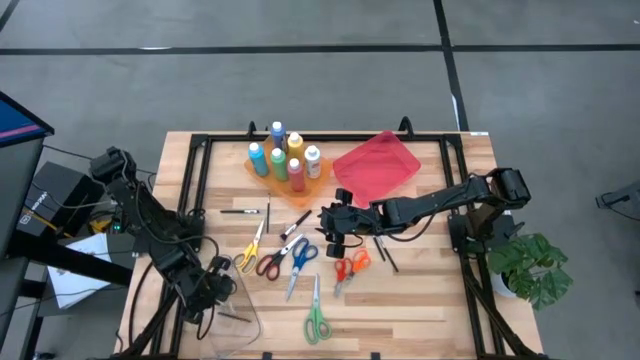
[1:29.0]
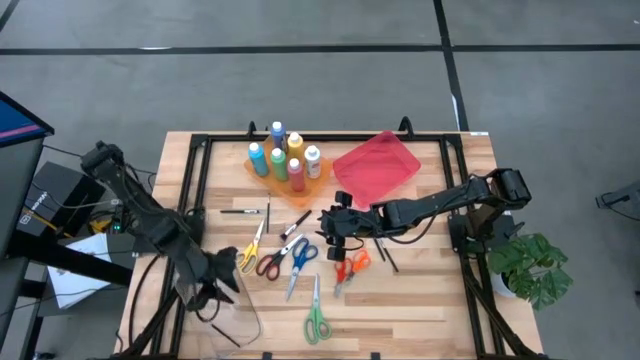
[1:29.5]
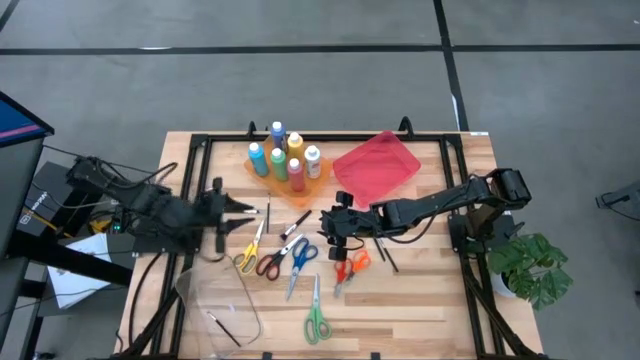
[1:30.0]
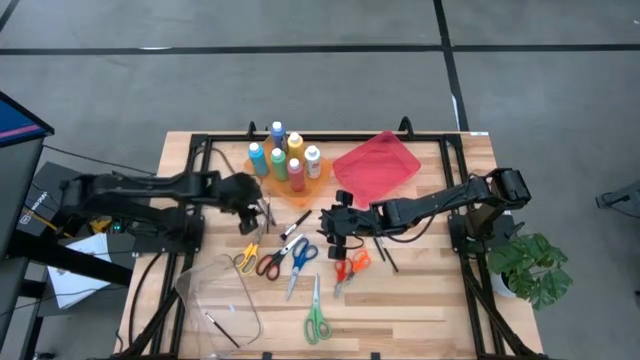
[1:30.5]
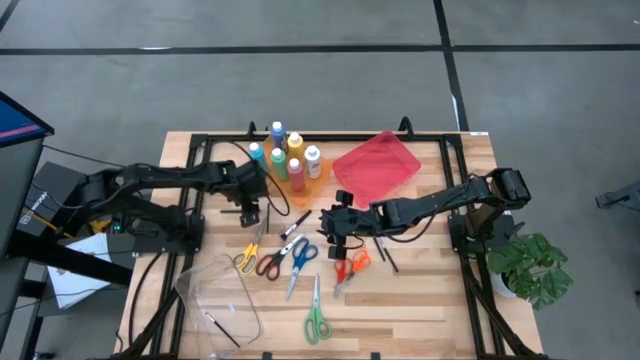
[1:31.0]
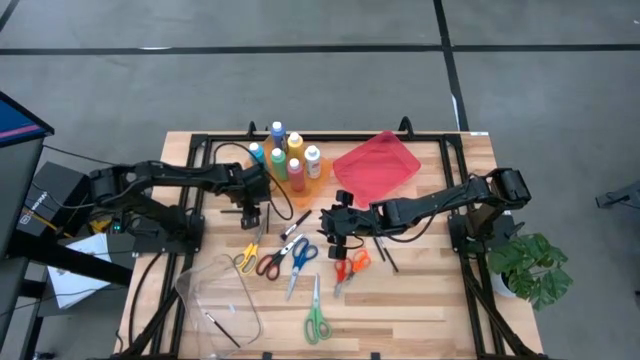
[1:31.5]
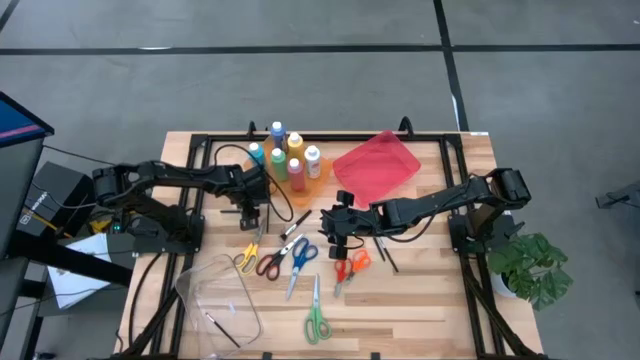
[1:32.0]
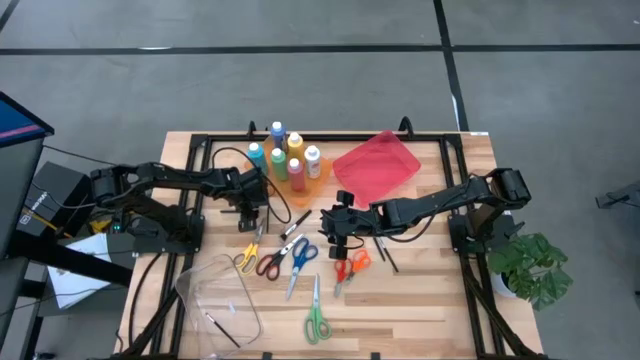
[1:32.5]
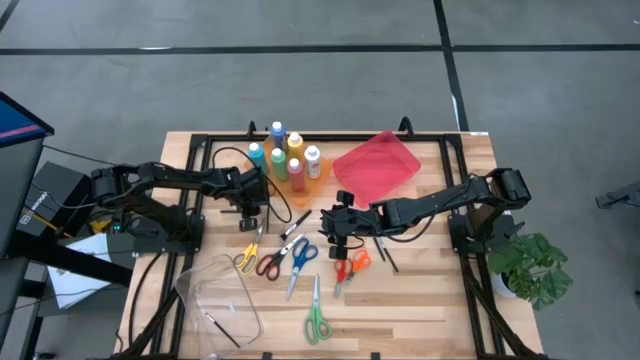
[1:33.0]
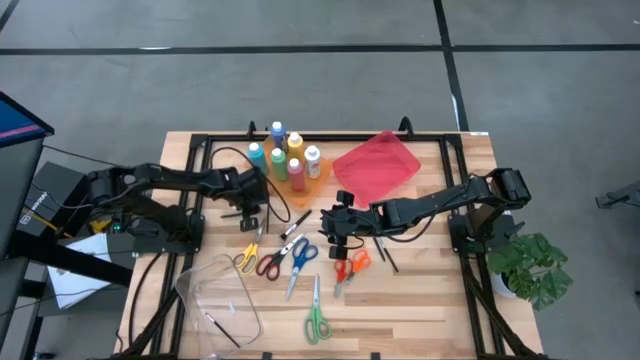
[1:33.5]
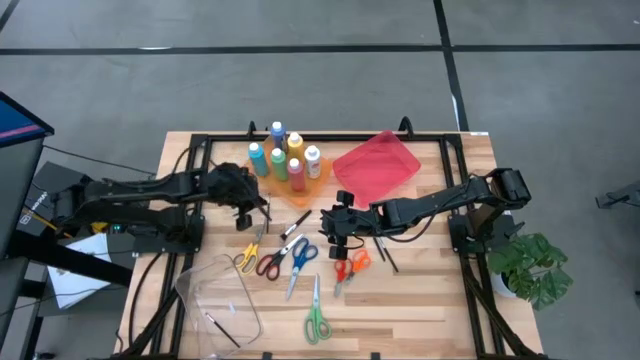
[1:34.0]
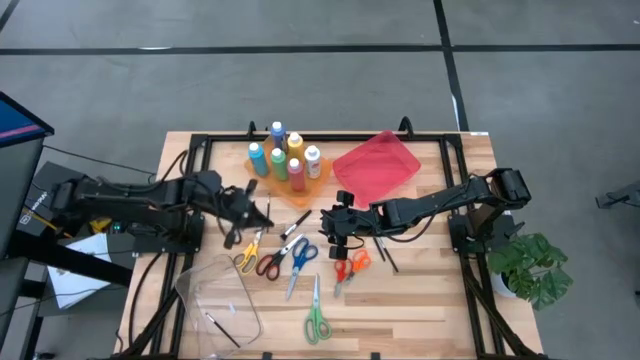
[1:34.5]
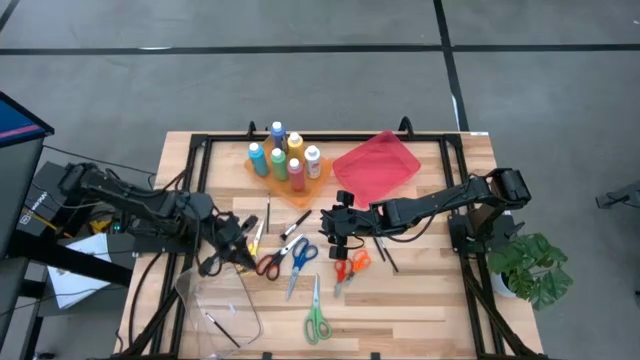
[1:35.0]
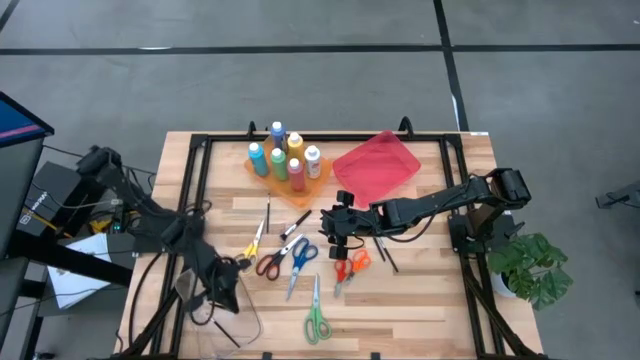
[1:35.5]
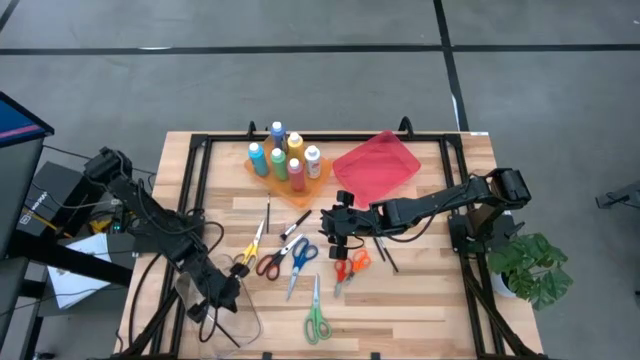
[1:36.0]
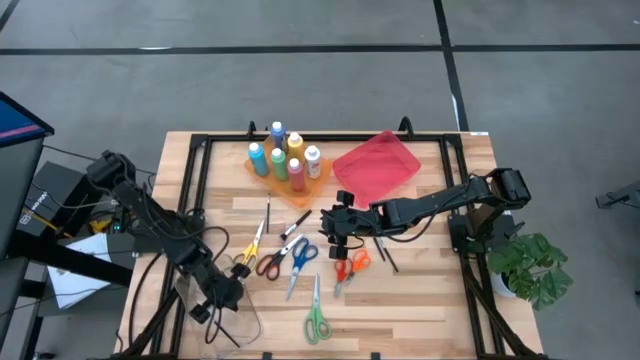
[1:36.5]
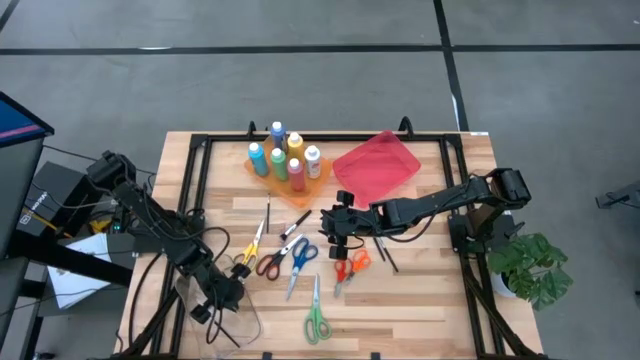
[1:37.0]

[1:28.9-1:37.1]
Task: Pick & Place Paint Supplies
Put the makeup brush into the transparent bin

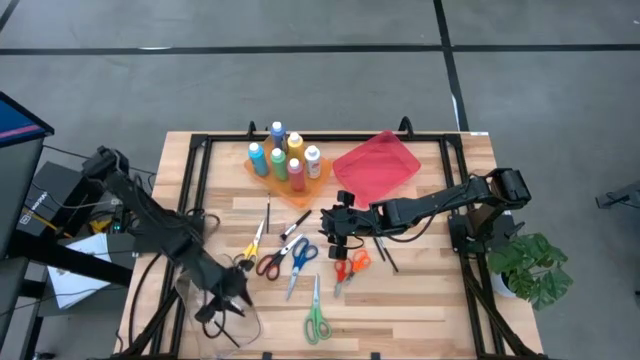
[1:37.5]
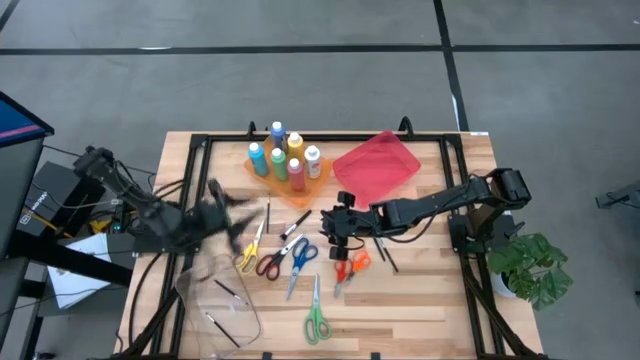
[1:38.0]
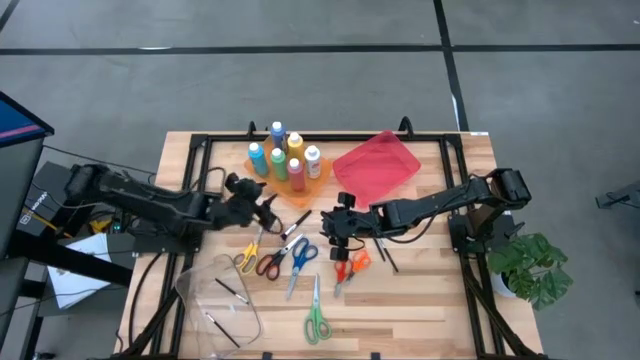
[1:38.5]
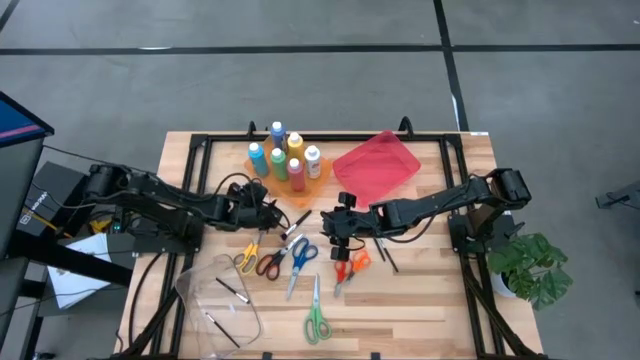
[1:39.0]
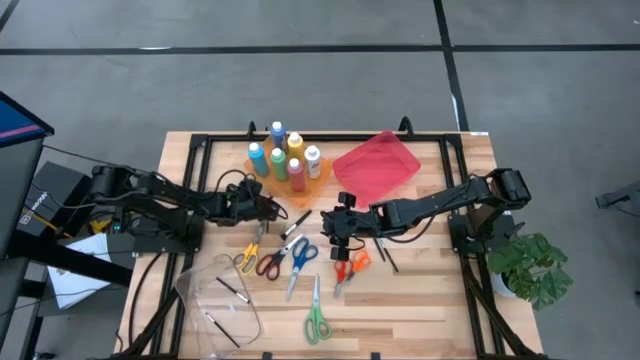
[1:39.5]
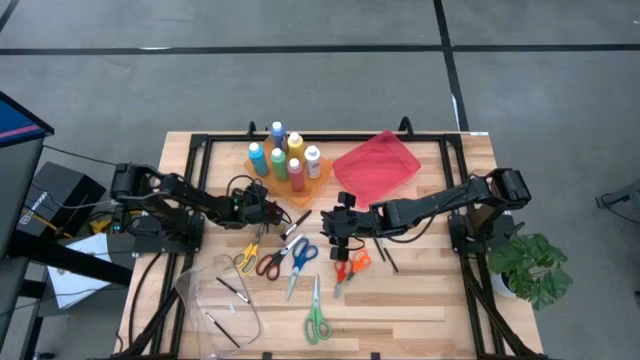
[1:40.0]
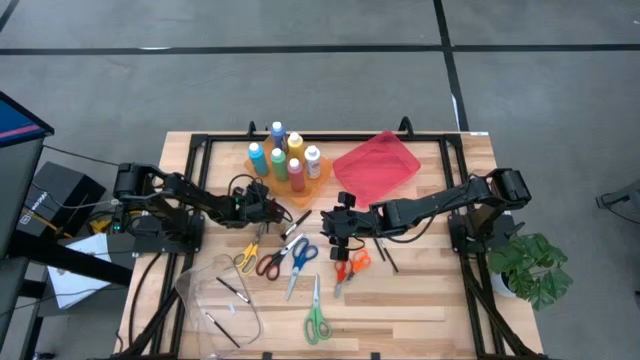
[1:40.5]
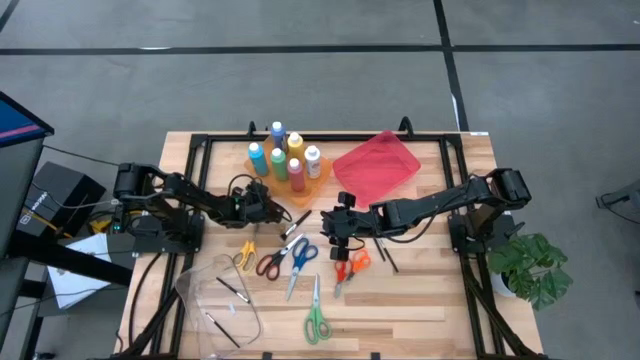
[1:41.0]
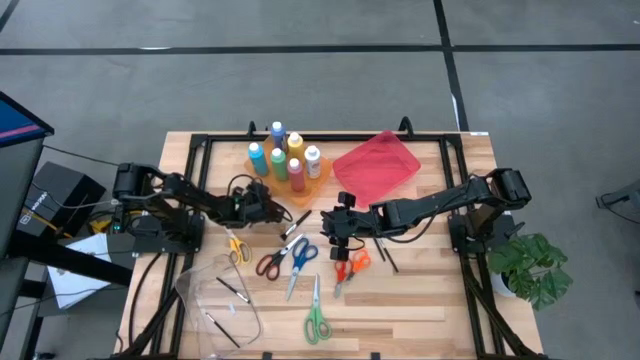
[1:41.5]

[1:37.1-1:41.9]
Put the makeup brush into the transparent bin

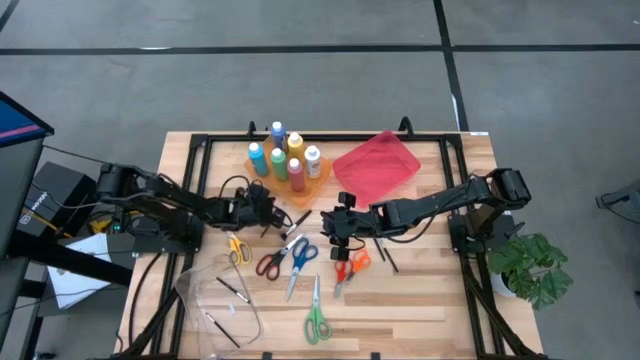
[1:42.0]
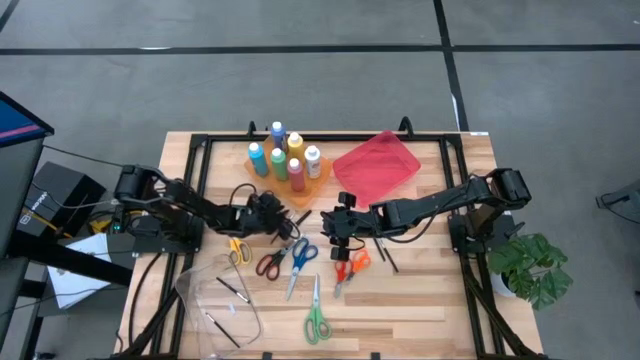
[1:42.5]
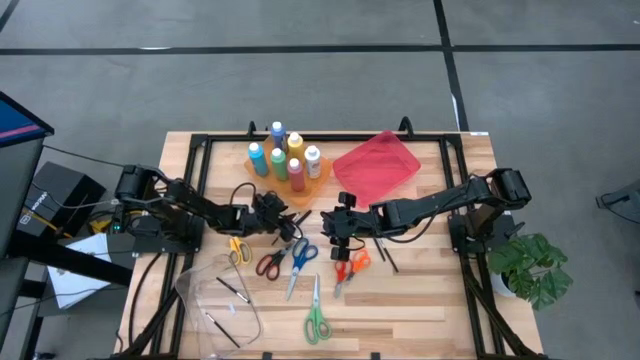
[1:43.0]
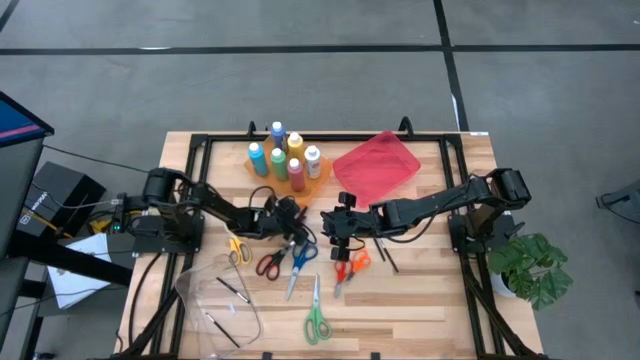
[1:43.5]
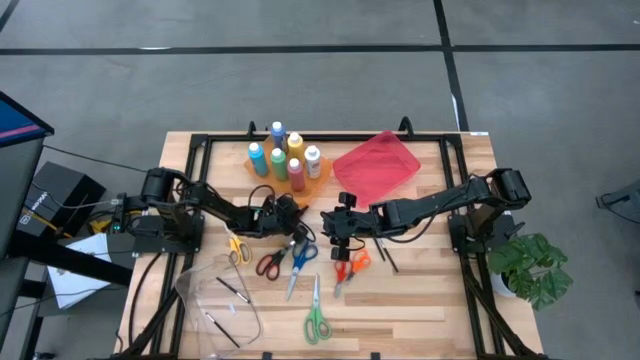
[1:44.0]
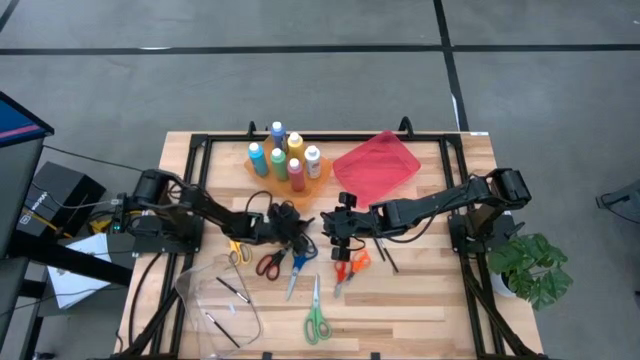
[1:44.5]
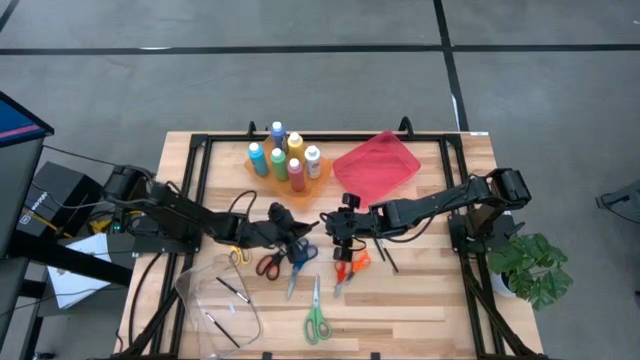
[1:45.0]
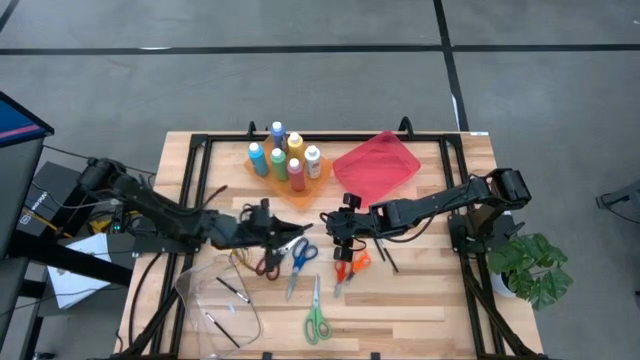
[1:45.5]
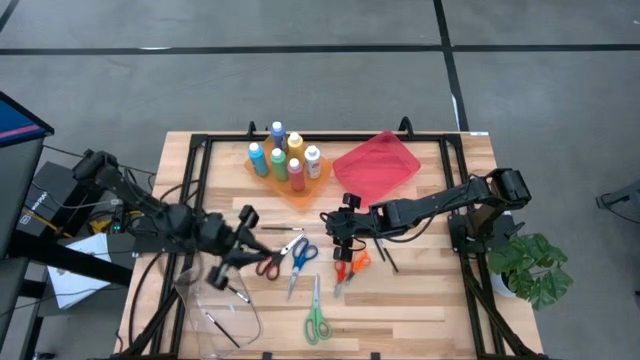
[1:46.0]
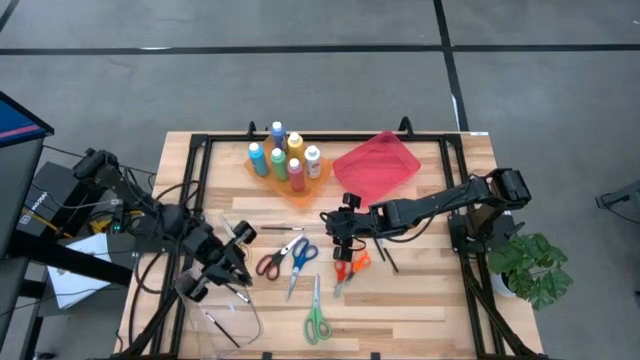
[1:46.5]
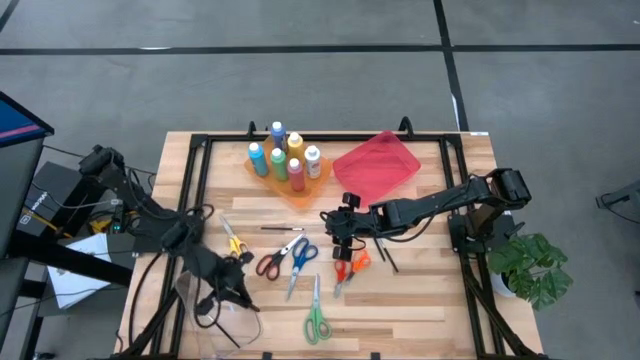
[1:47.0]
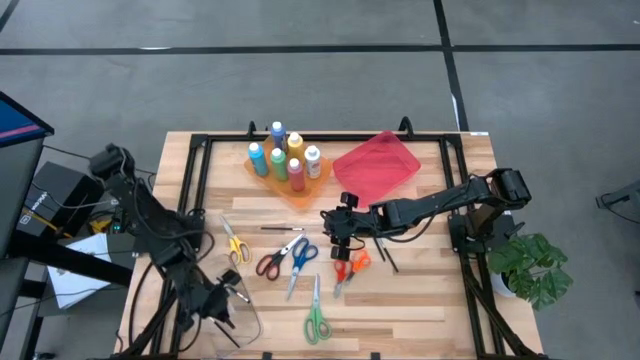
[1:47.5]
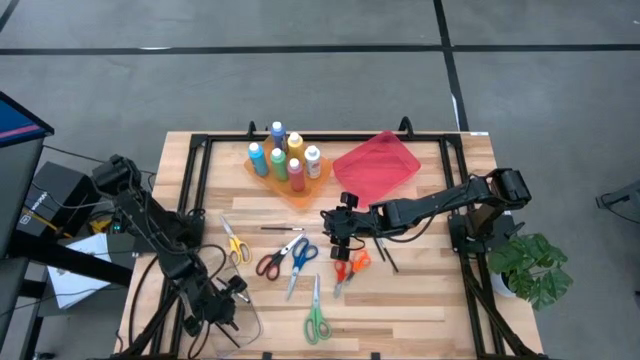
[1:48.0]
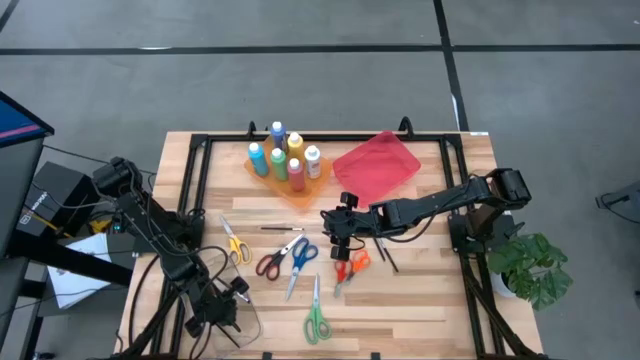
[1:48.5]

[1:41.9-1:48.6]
Put the makeup brush into the transparent bin

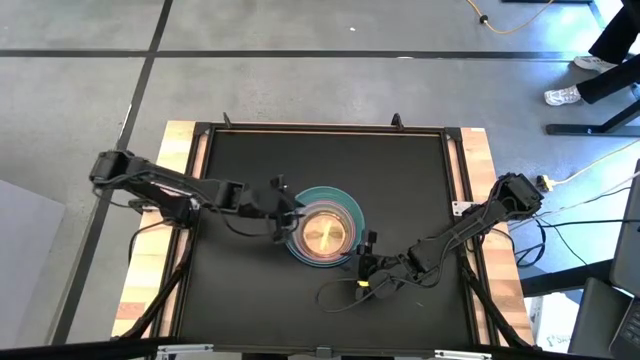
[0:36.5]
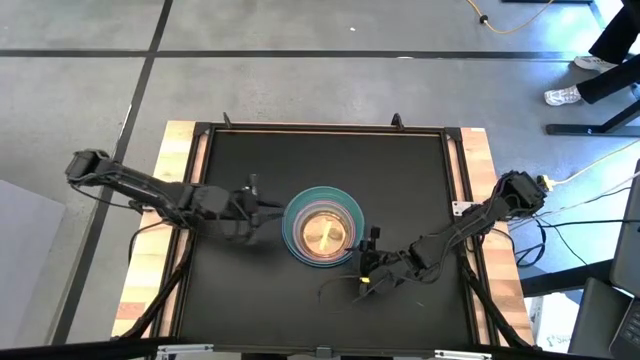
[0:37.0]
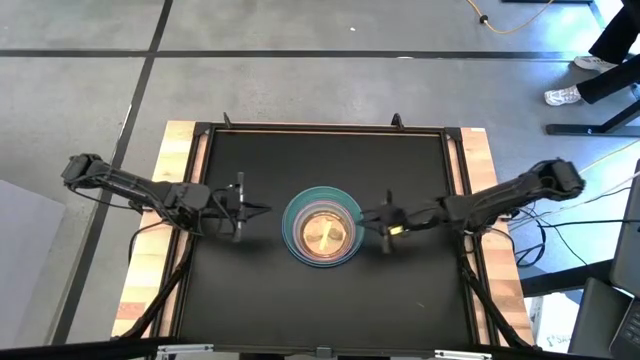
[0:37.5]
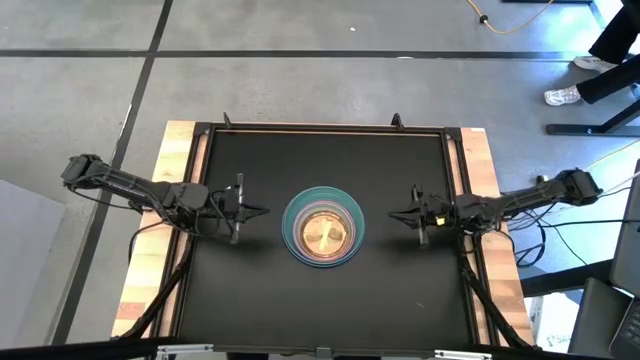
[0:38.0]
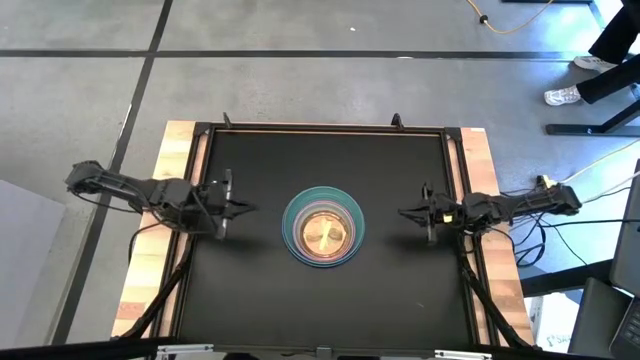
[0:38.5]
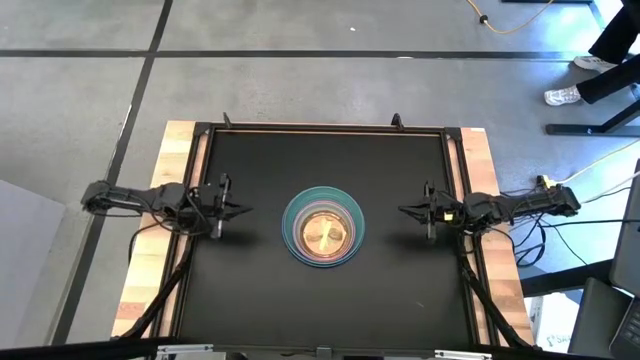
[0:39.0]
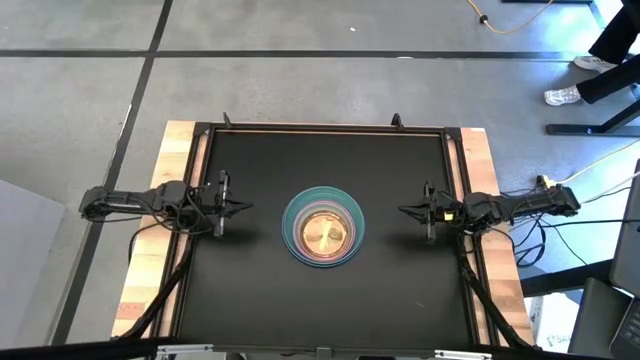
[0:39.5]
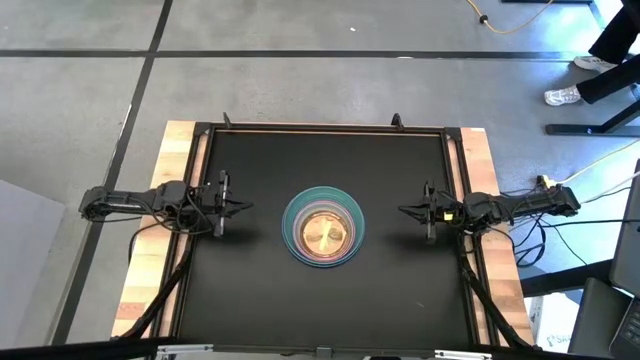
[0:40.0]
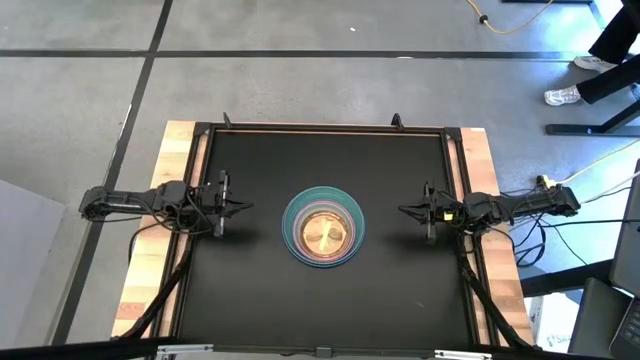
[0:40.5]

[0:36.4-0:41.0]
Task: Stack plastic plates
Return to Home Position
